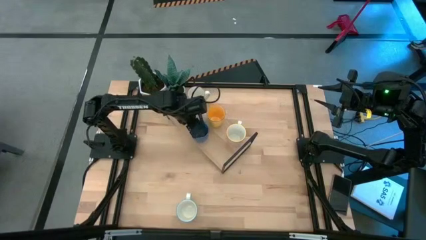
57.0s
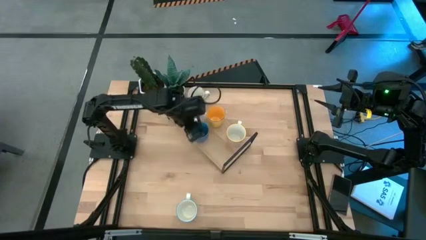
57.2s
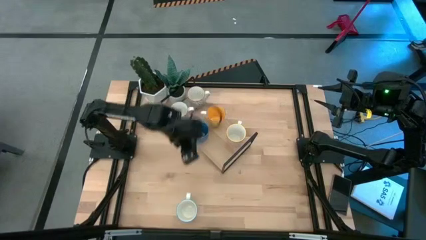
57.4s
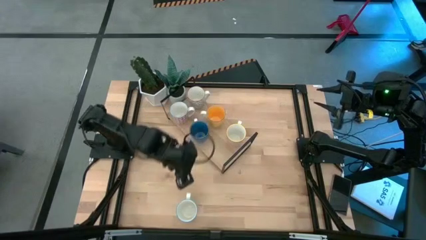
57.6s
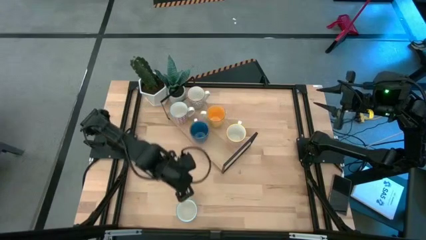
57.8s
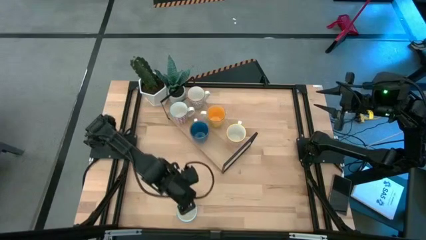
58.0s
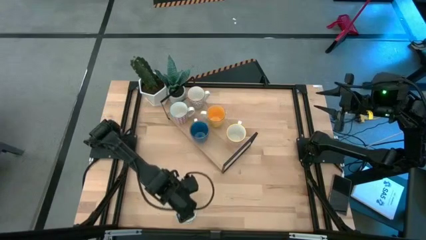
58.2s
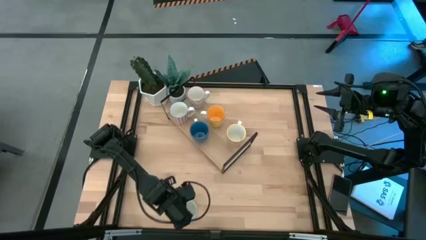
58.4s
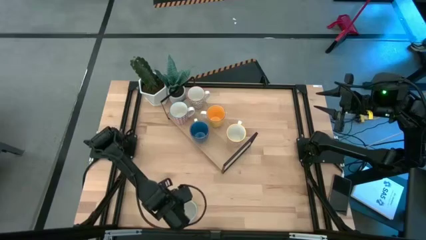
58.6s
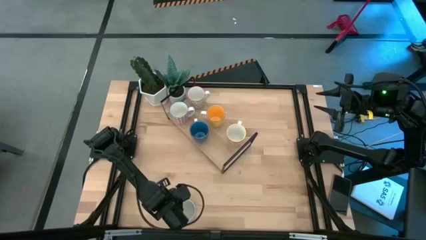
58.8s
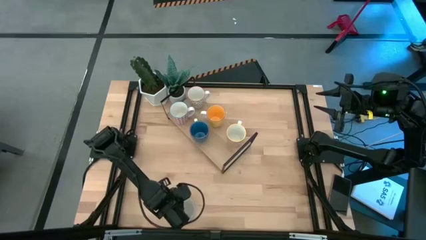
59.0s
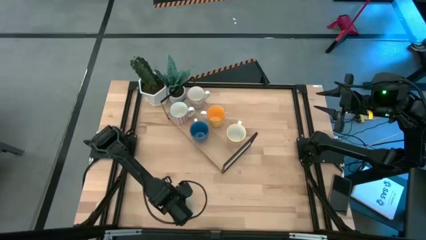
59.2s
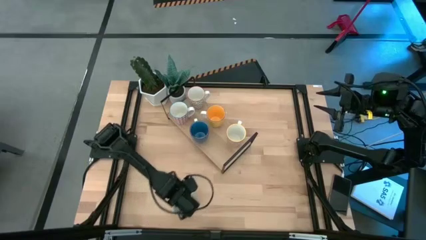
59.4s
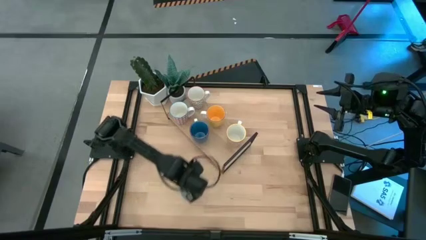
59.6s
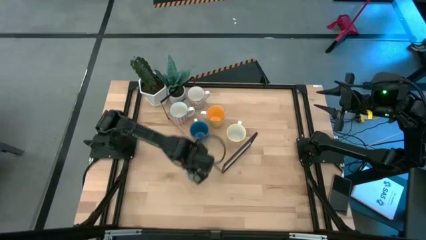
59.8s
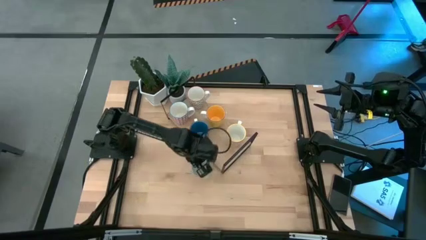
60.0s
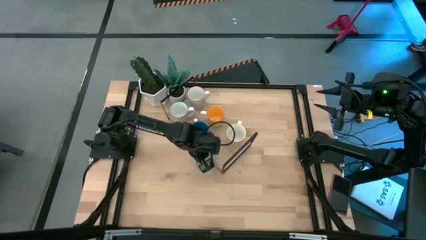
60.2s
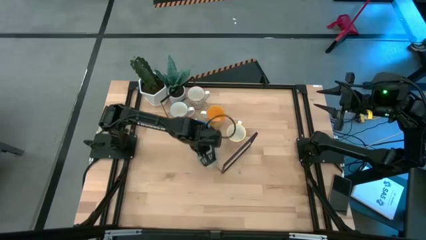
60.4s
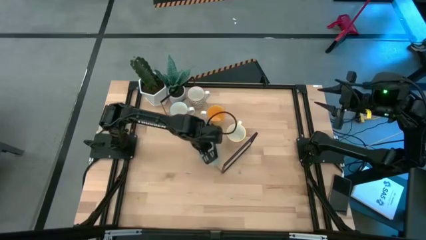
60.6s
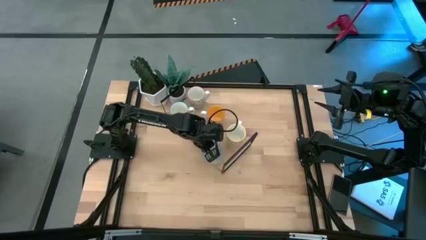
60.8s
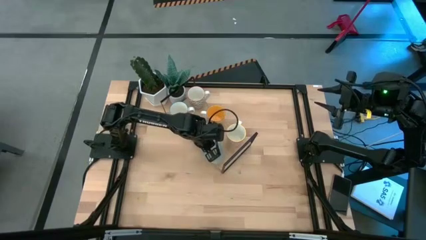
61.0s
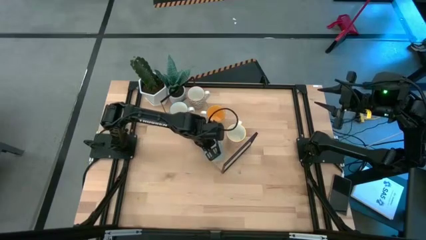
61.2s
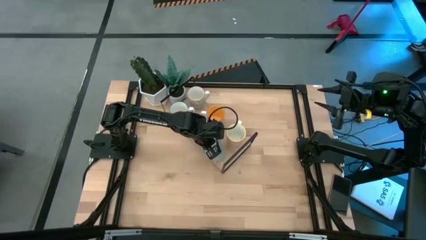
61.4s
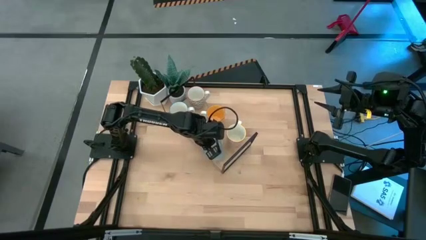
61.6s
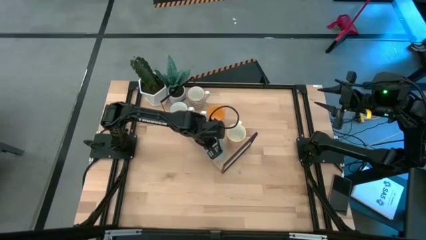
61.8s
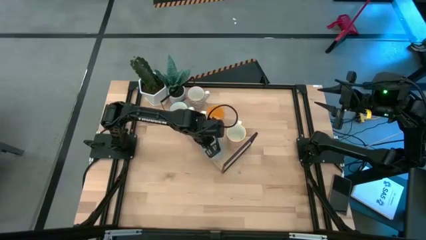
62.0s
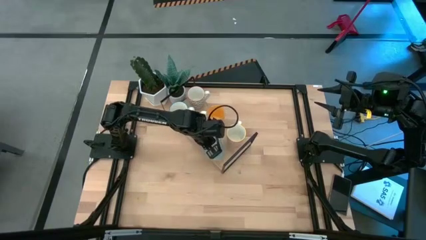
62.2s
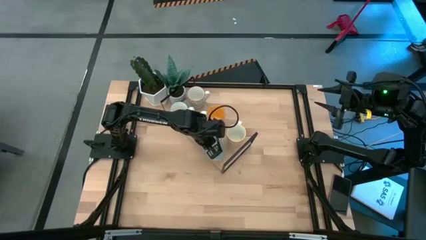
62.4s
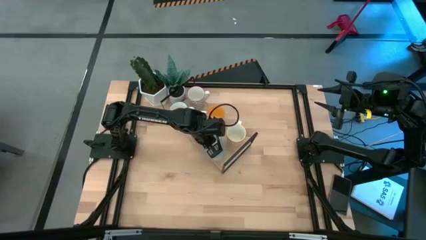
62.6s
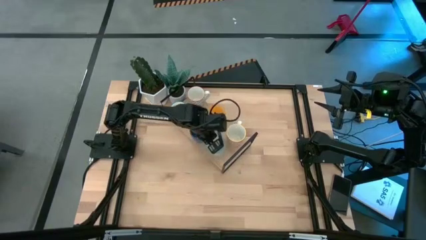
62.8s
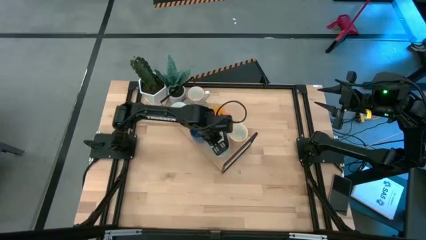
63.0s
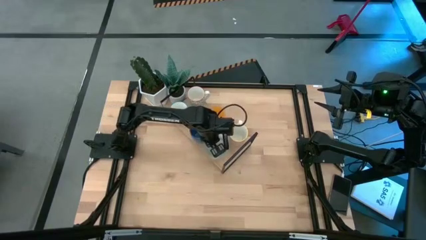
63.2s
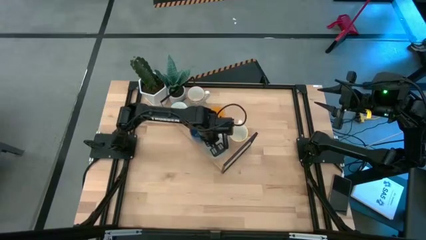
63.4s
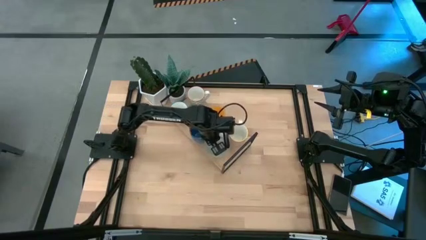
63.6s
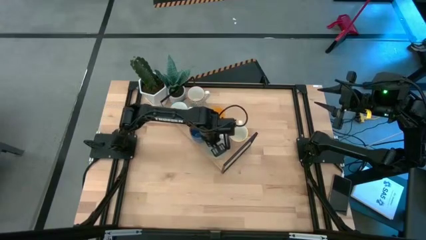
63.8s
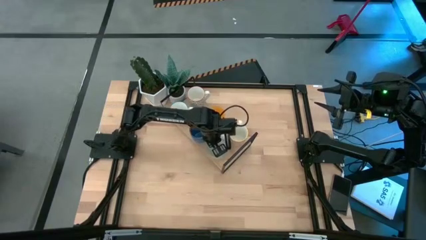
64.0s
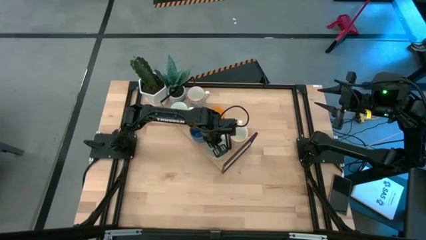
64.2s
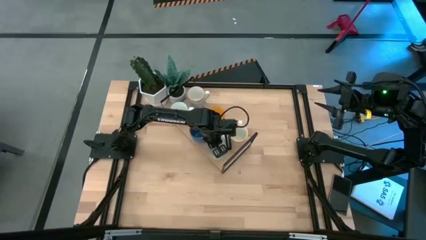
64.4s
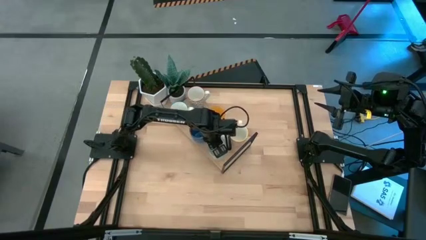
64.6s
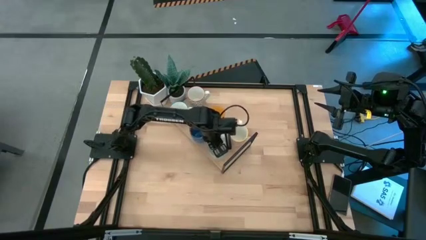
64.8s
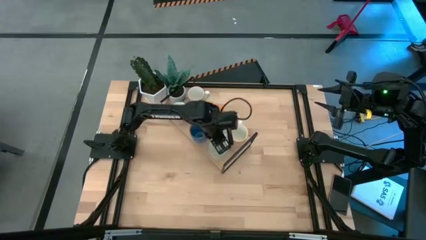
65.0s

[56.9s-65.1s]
Task: Place coffee mugs
Put the green mug on the shelf

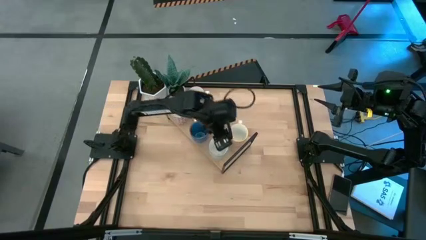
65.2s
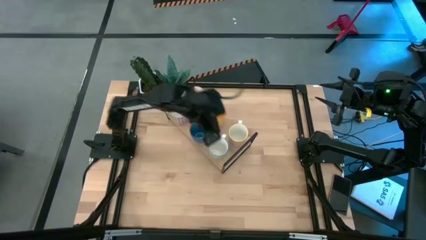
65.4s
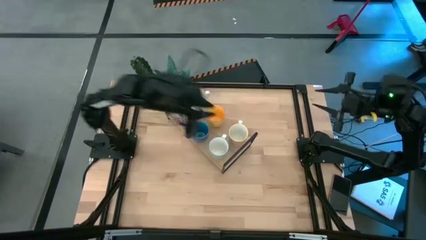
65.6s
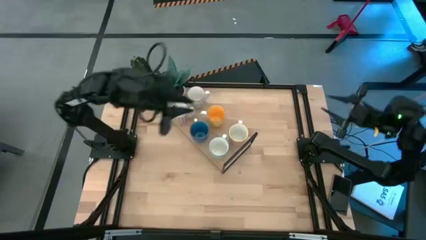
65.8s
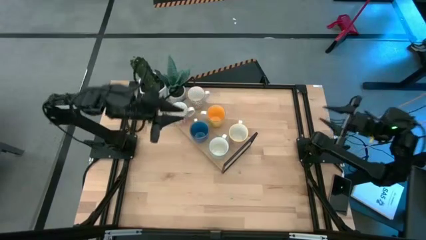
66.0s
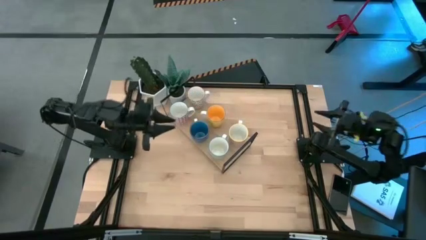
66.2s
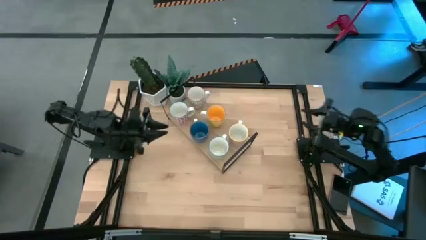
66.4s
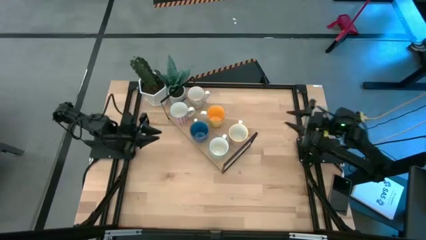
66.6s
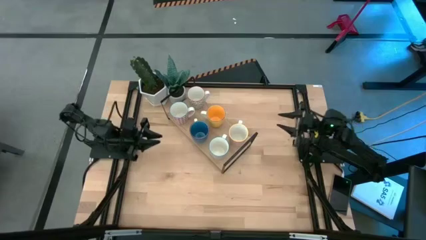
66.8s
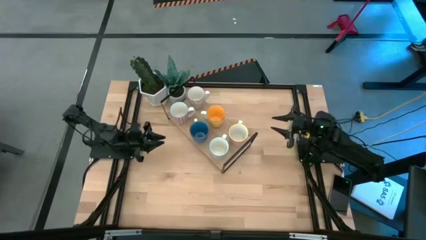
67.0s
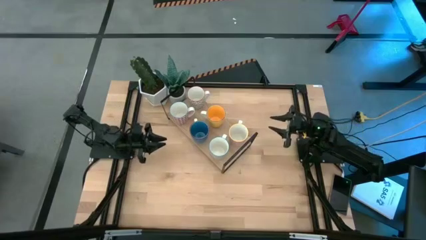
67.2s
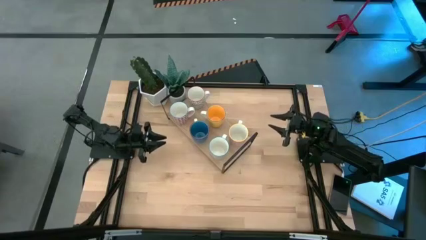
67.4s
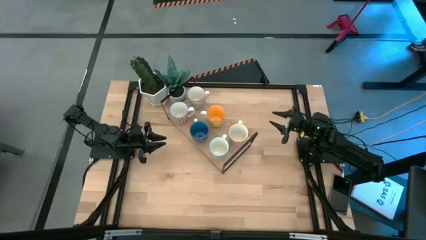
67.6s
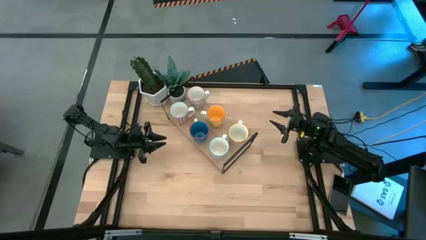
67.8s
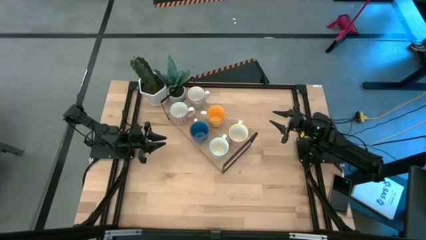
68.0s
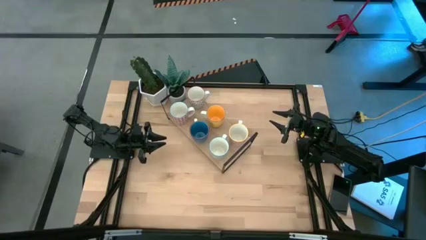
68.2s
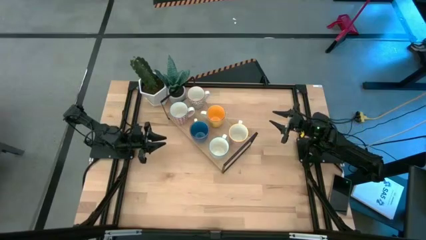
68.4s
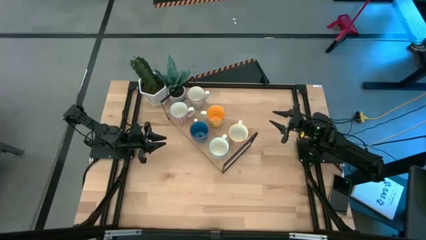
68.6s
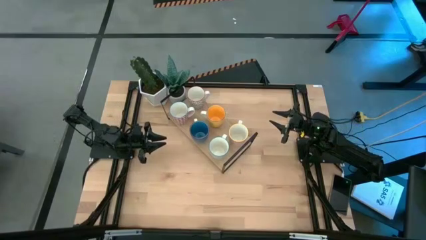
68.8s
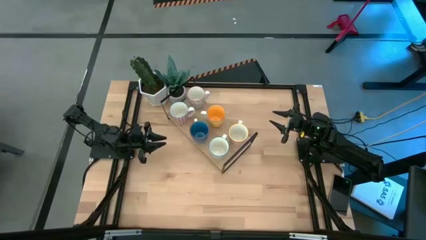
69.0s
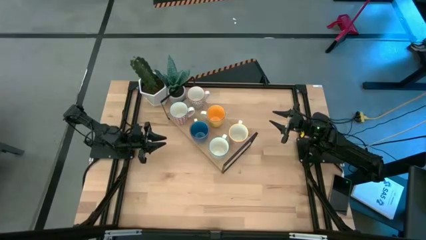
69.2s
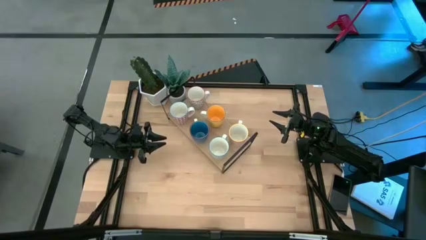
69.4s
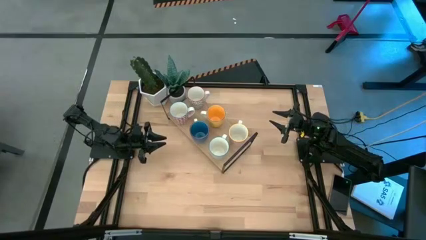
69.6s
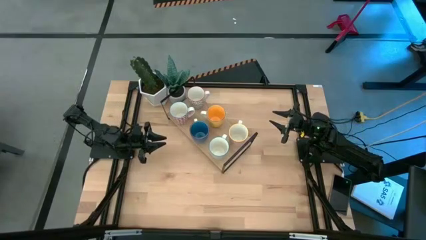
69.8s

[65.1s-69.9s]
Return to Home Position

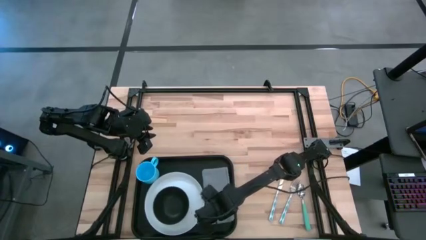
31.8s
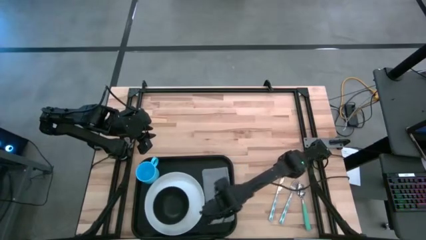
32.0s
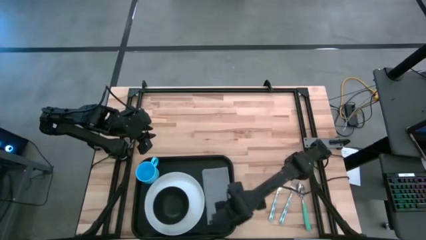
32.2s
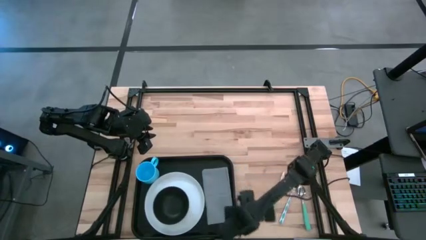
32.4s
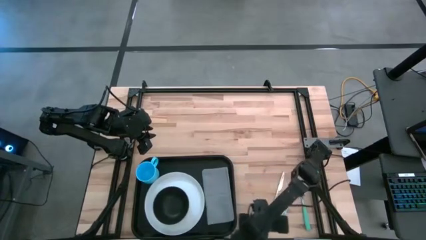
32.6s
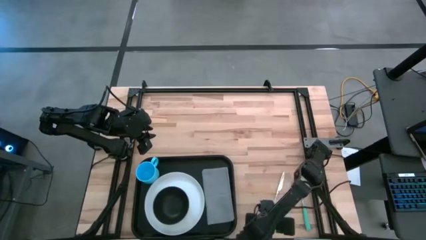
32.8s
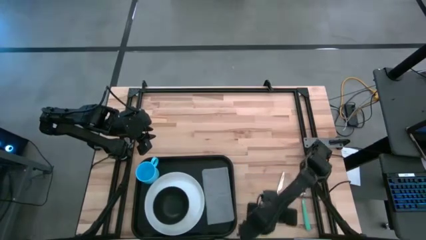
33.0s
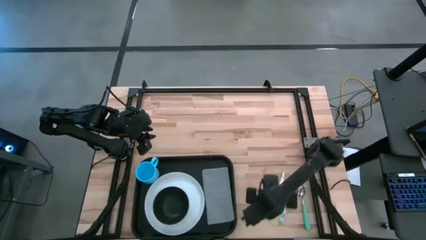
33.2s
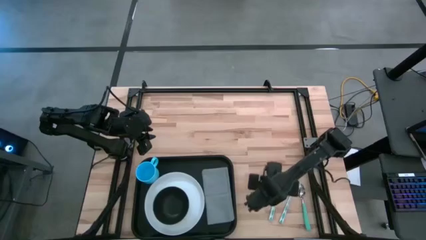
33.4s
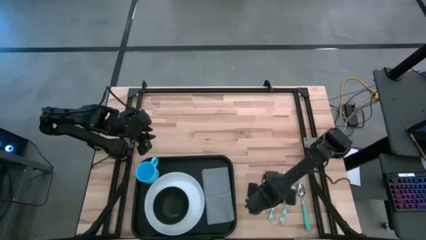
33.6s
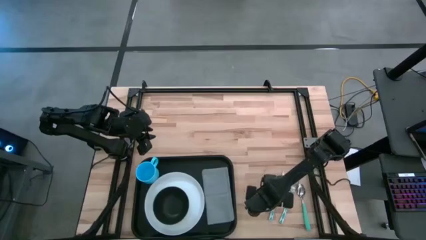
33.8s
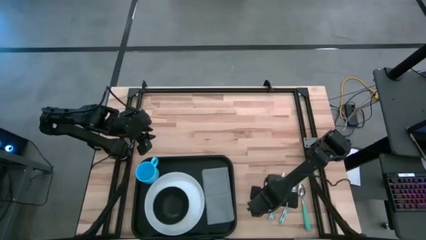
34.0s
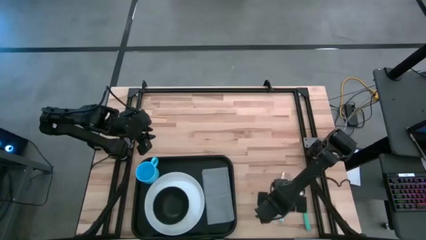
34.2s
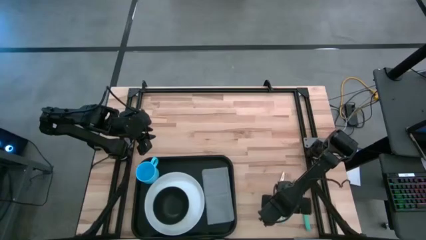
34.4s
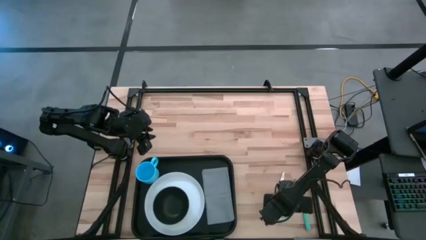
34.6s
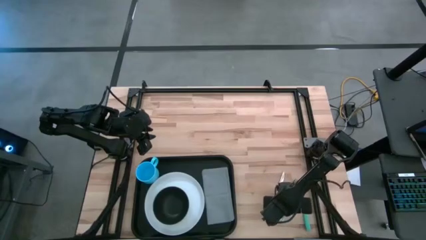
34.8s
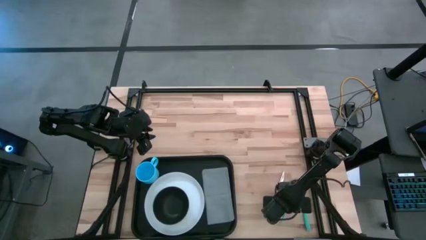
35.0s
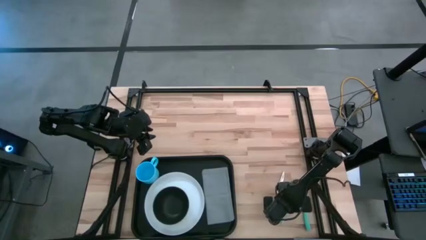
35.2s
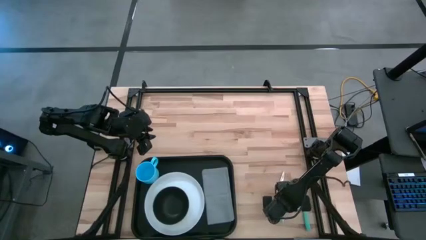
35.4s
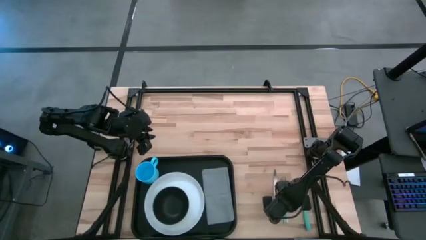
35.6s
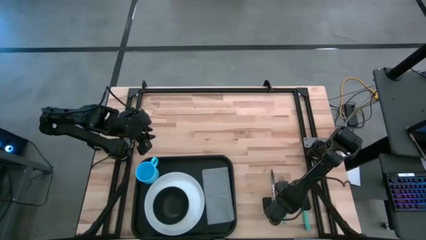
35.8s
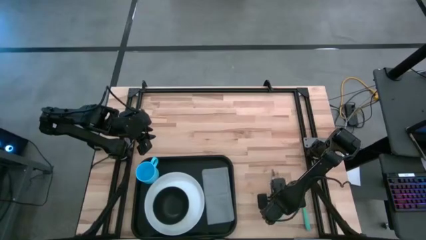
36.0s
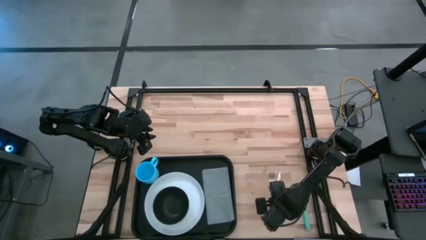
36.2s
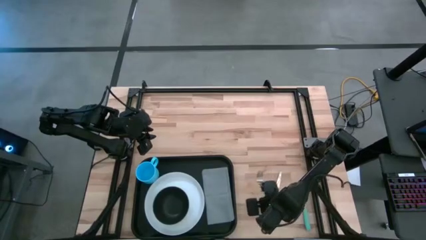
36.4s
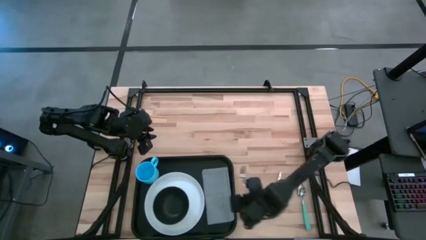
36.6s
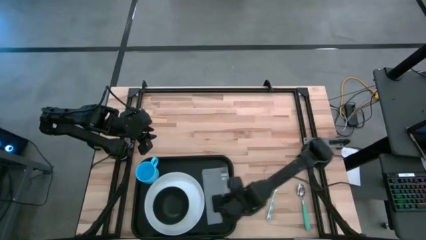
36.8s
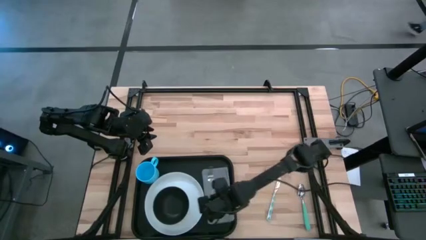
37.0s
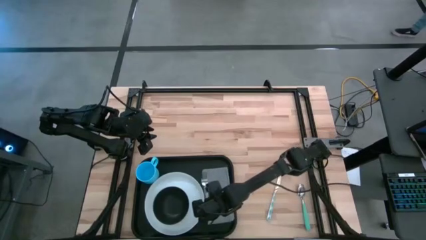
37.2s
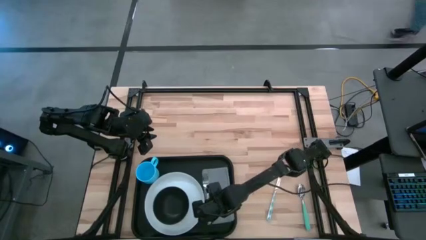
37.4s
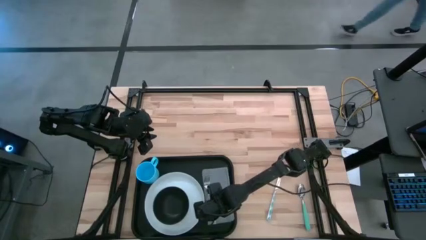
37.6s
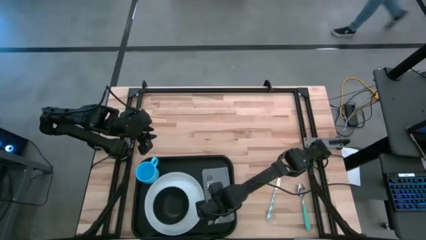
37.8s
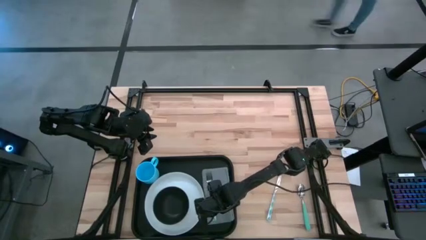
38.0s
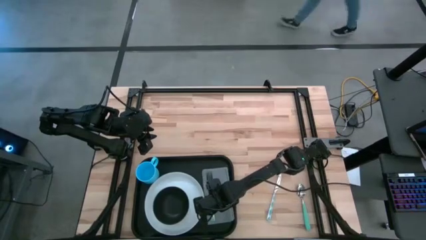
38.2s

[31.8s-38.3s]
Task: Set up tray
Put the white green fork on top of the gray napkin on the black serving tray
